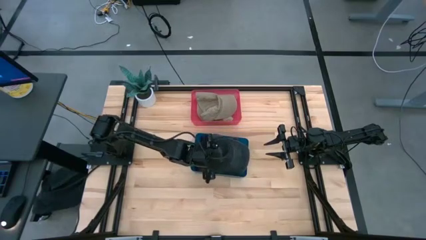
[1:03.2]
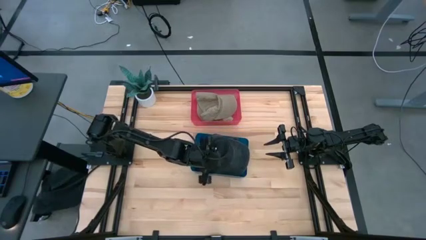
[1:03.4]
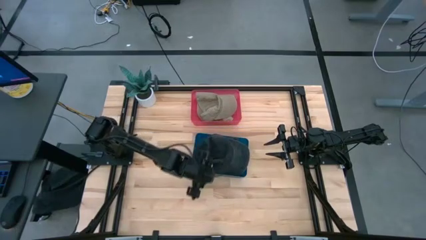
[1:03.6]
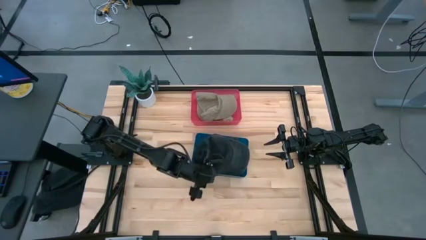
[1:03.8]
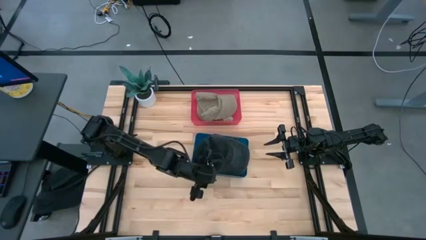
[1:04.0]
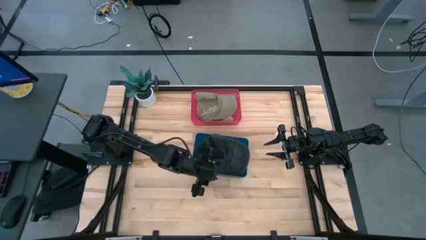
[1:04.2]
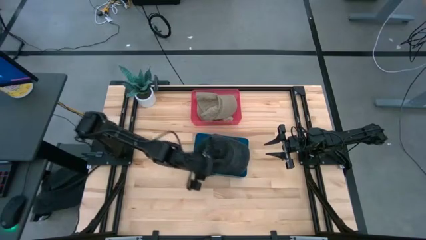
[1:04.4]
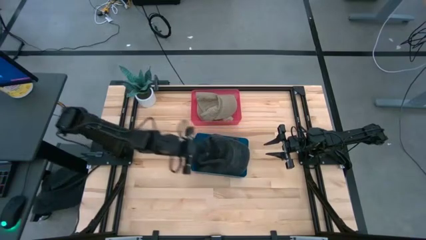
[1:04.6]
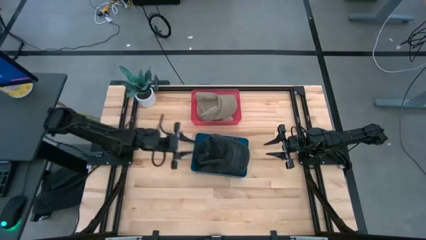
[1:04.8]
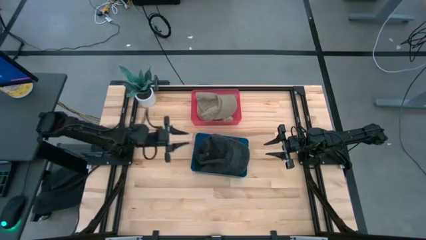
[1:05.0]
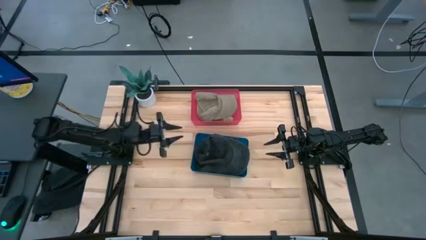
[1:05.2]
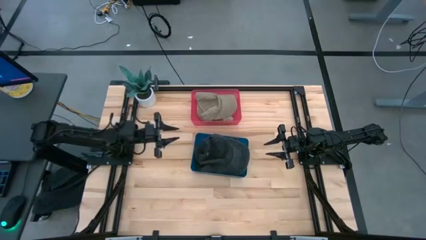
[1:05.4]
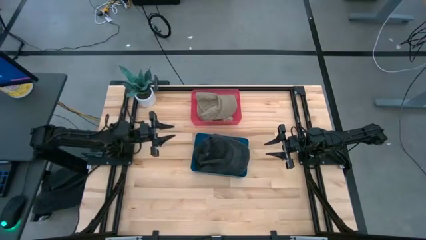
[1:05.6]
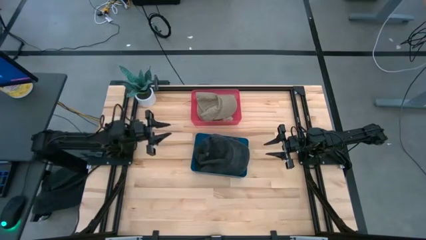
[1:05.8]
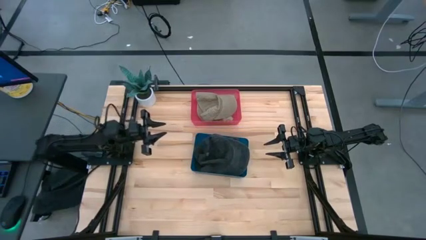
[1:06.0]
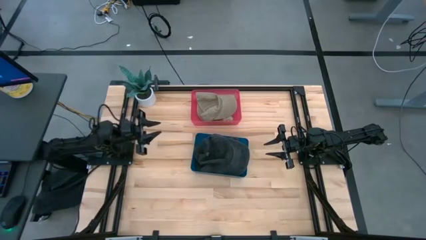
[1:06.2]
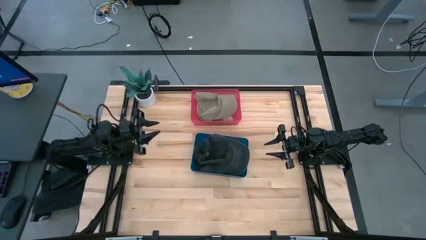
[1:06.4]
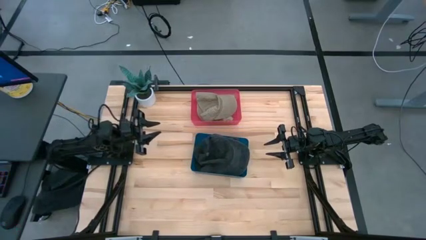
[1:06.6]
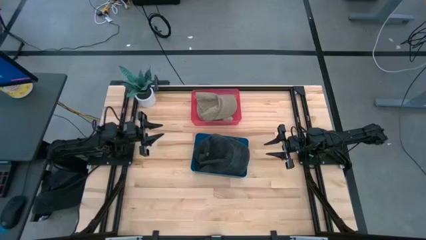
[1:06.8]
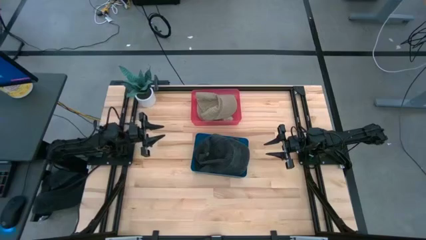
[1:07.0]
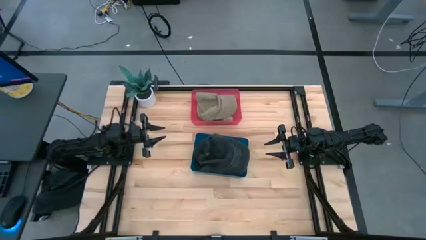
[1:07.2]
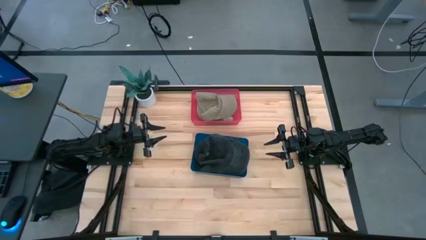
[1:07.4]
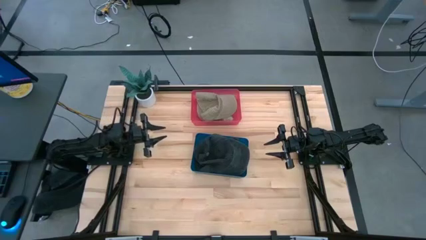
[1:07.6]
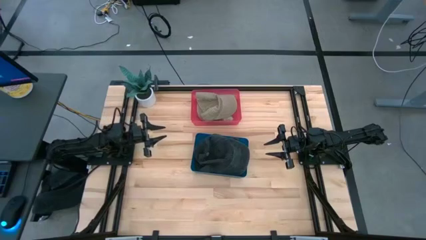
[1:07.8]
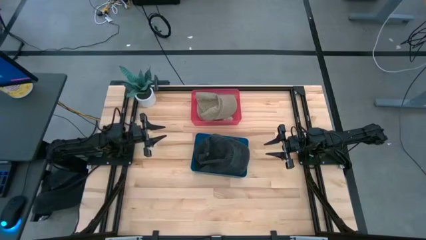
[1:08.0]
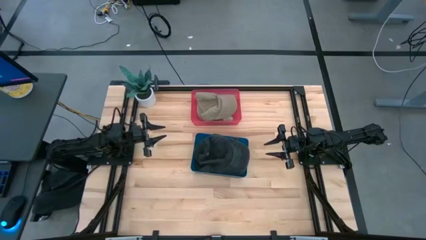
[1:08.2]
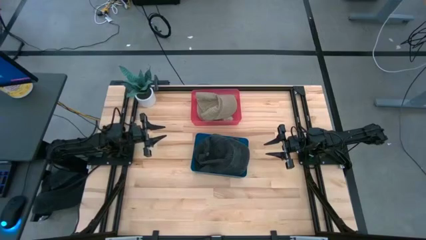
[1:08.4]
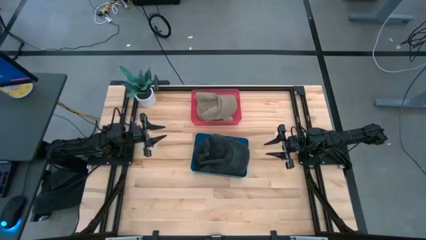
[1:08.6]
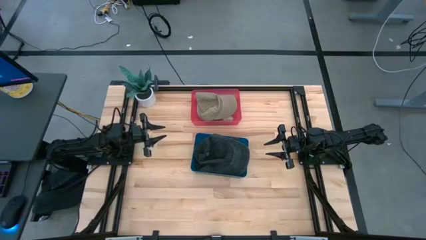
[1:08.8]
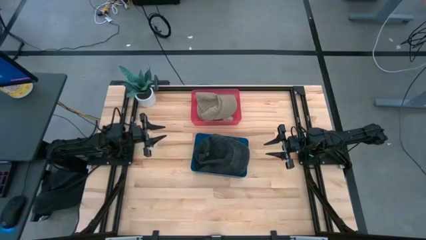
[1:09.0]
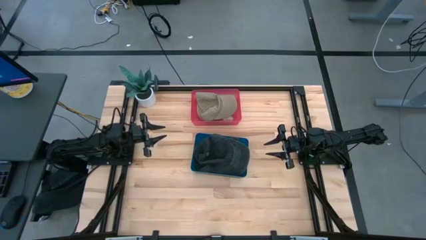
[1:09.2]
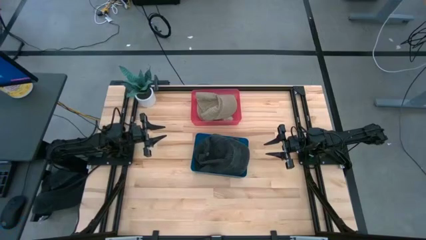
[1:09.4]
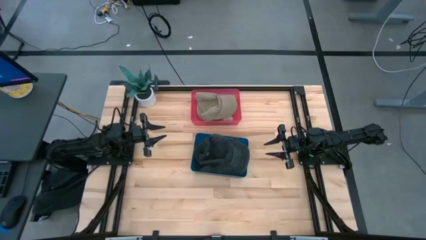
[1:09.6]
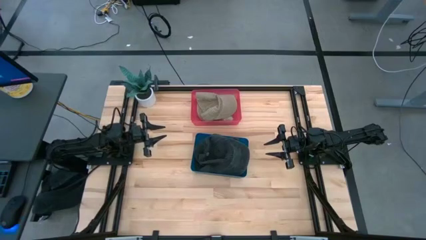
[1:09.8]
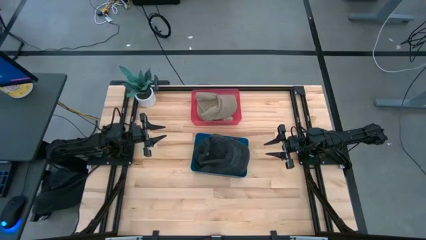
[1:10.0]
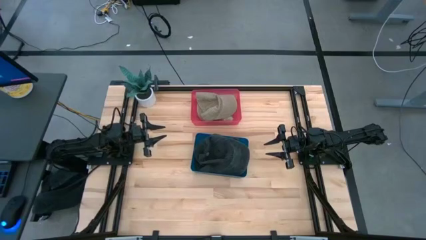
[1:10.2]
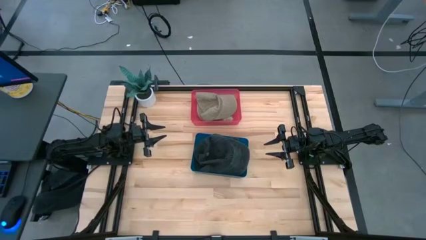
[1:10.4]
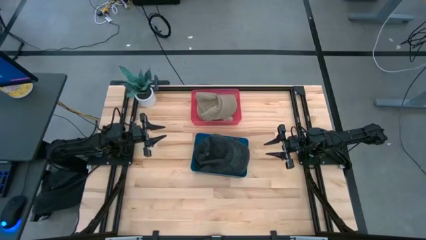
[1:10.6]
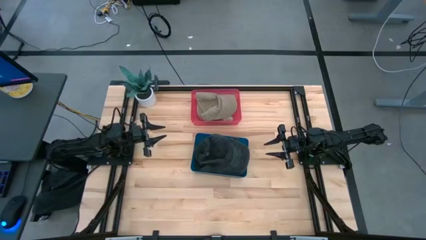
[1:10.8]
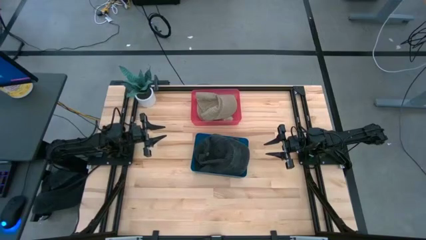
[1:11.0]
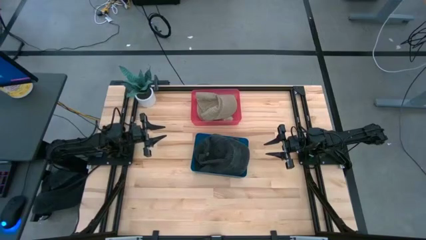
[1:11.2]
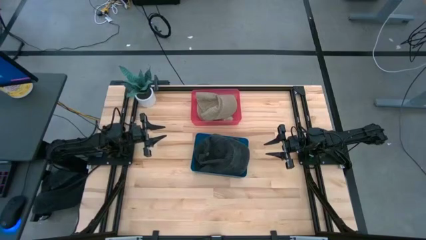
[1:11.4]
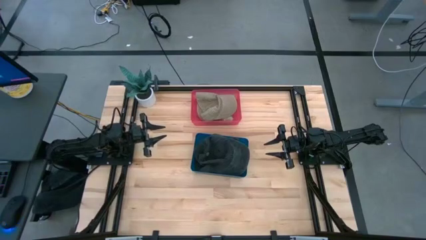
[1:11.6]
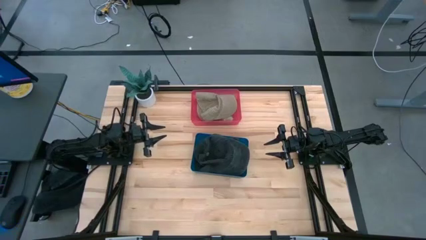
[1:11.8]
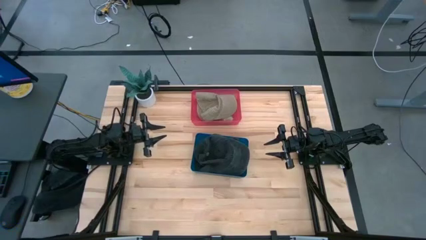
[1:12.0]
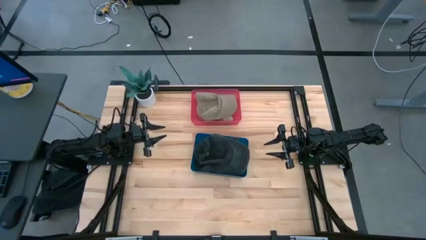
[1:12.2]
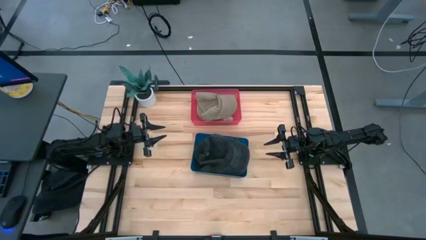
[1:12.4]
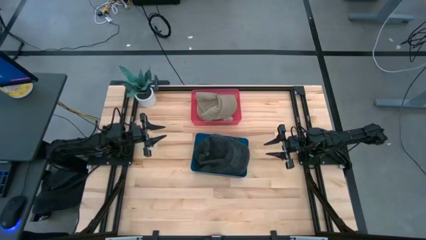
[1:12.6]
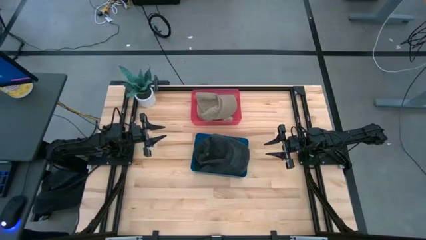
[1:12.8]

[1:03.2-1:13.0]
Task: Pick & Place hat
Return to Home Position

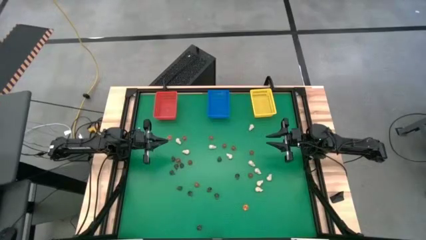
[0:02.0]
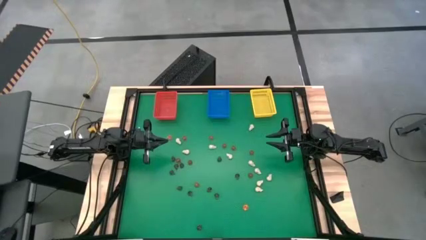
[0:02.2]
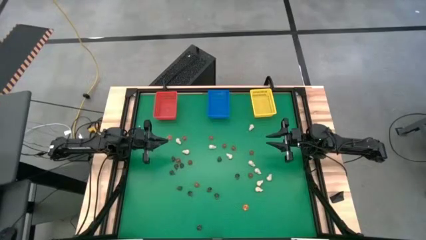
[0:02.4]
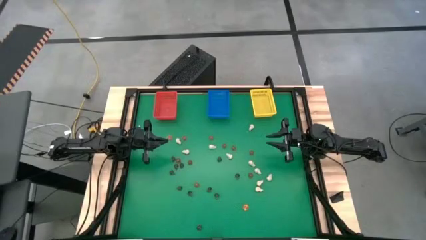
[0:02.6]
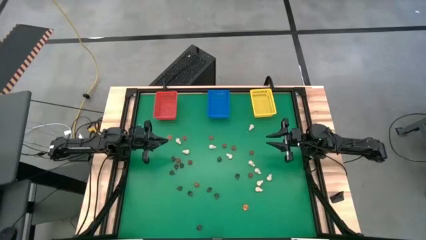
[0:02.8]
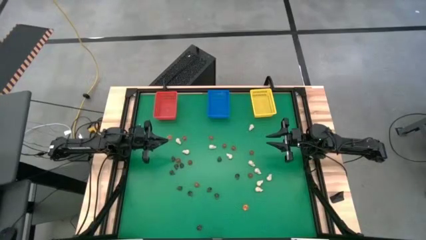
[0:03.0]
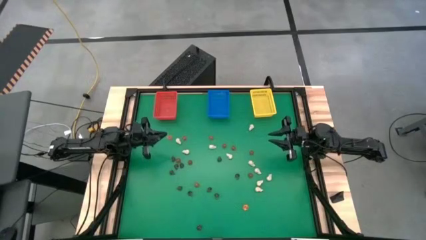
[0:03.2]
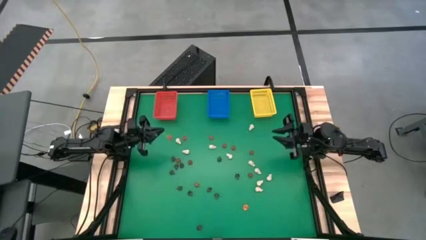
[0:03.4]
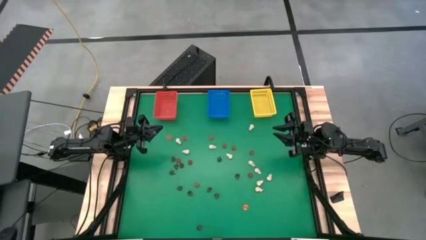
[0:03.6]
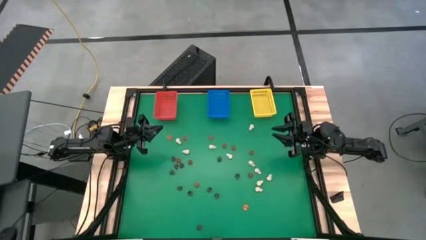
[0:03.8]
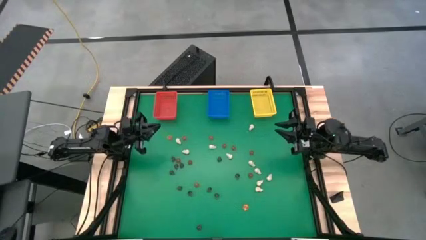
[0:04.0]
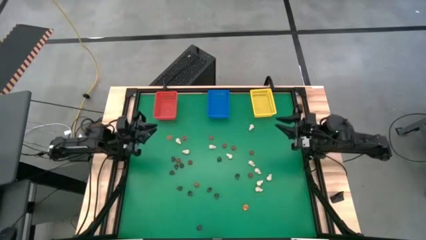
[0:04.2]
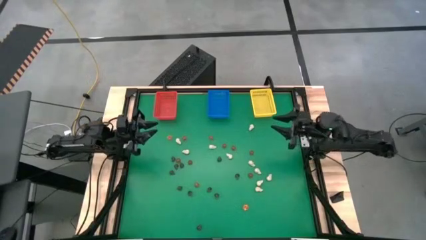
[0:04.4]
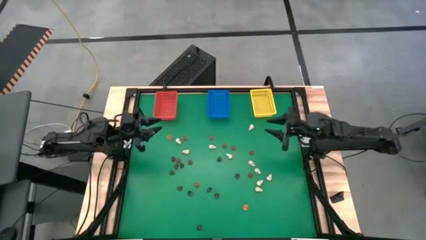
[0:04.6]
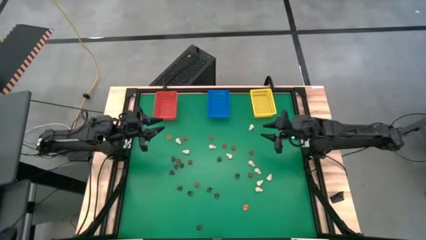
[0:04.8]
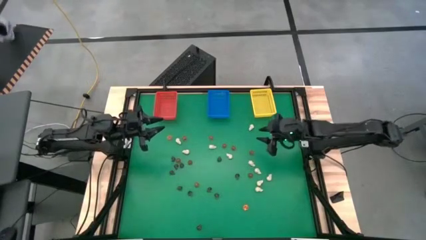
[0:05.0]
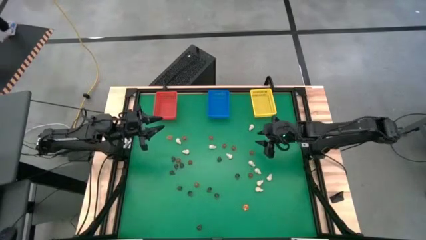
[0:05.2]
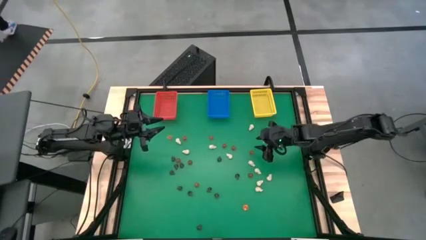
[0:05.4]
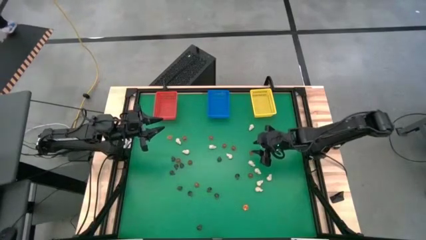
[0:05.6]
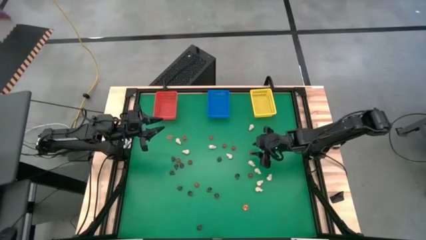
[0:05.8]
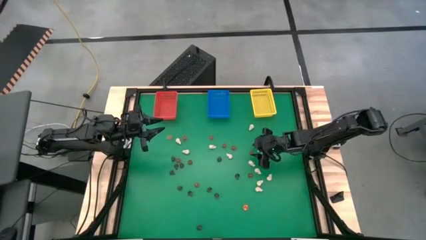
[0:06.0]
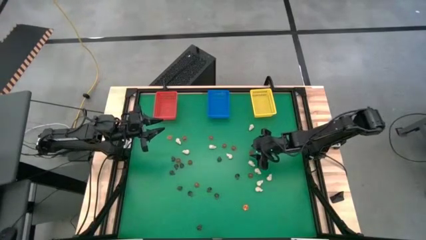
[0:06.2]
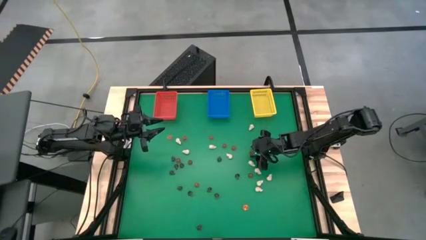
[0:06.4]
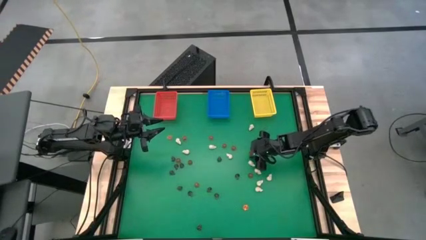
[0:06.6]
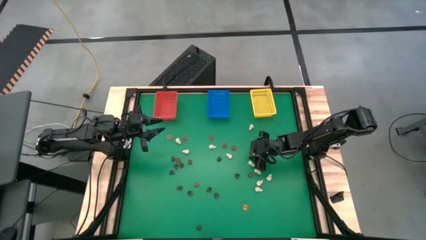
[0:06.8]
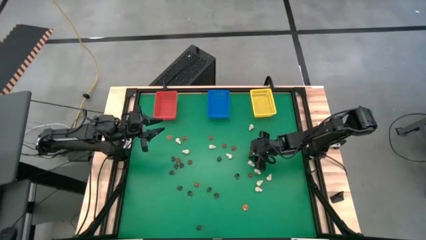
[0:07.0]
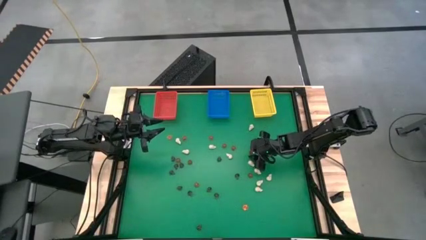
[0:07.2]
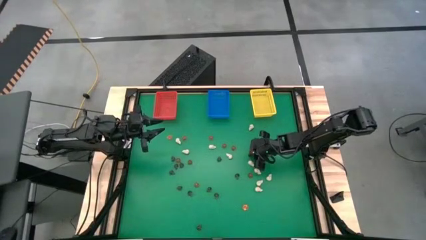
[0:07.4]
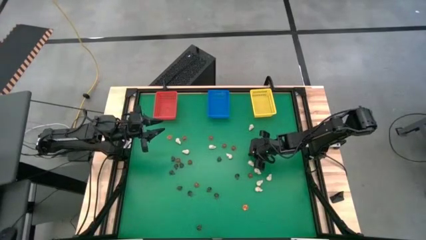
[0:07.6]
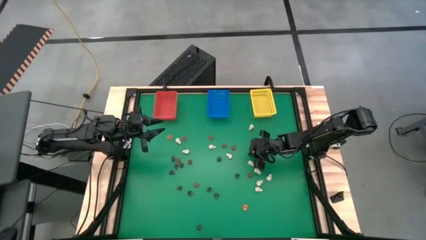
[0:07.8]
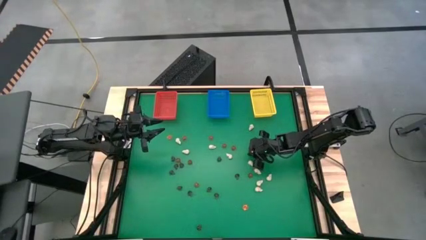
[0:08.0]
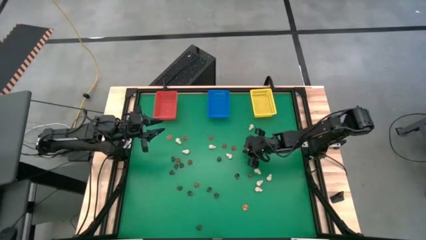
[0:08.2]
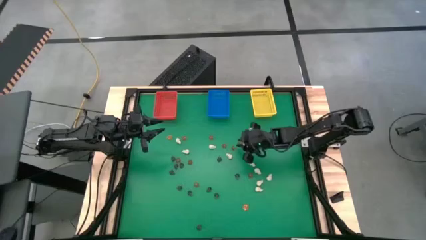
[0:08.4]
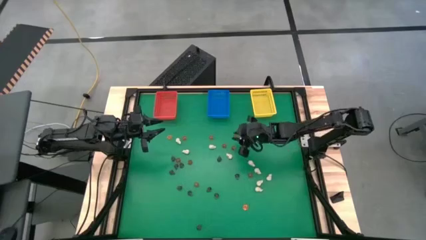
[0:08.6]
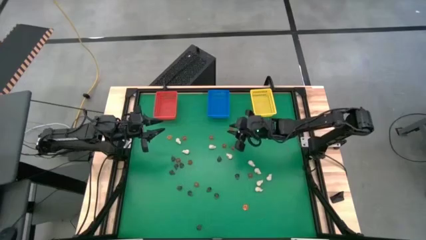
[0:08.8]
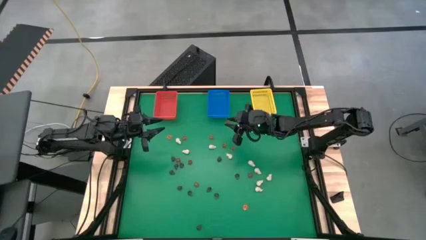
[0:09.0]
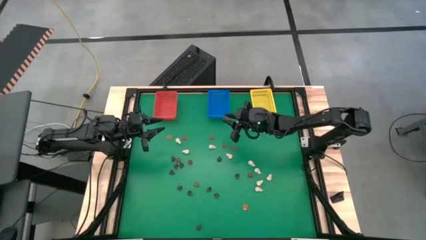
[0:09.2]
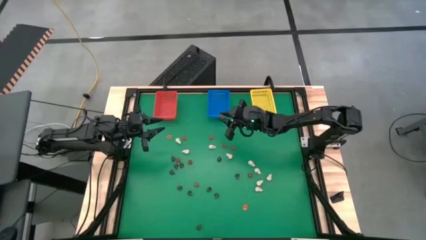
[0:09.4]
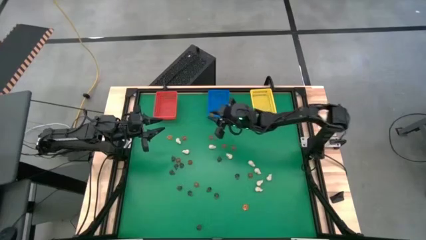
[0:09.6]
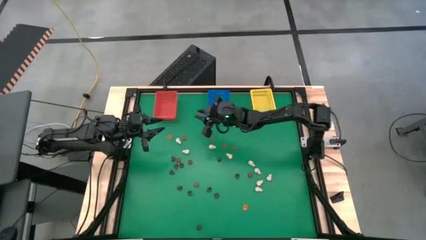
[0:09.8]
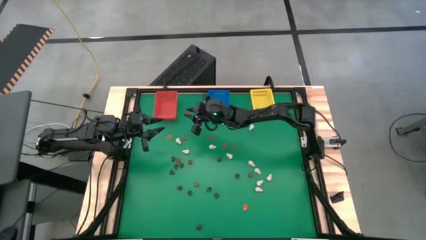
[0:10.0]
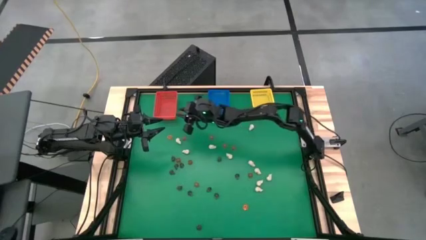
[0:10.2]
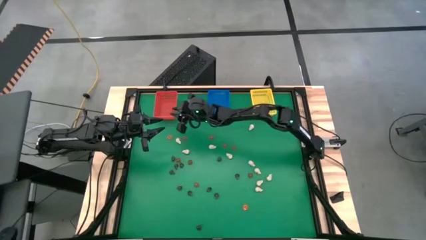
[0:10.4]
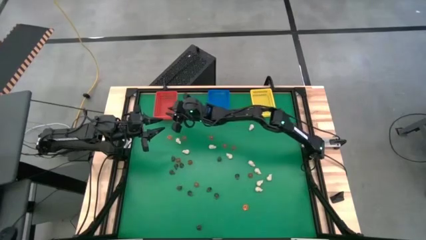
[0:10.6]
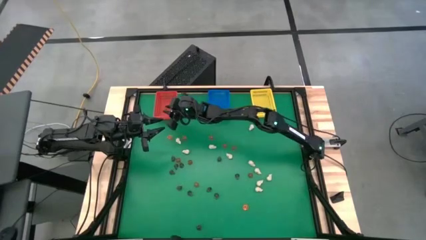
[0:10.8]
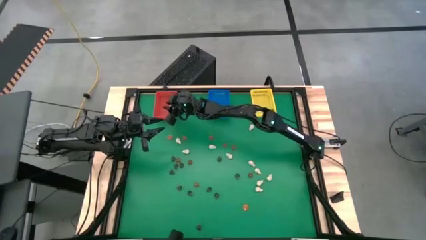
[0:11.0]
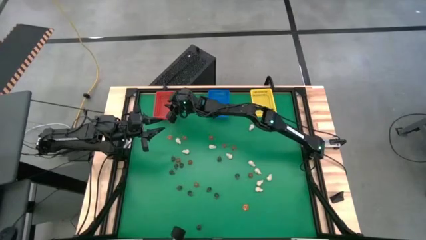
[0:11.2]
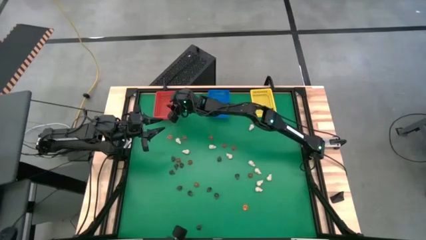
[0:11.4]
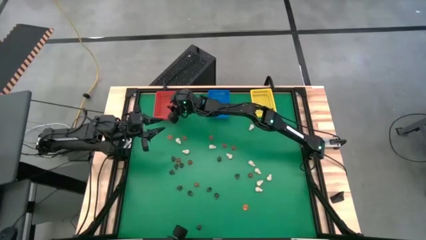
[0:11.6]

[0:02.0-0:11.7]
Task: Sort Halloween decoration
Put the orange pumpkin toy into the red bin
